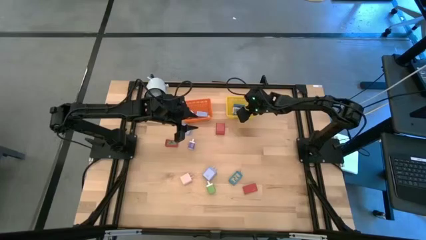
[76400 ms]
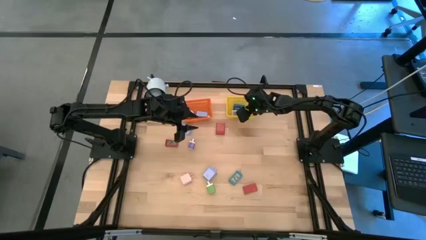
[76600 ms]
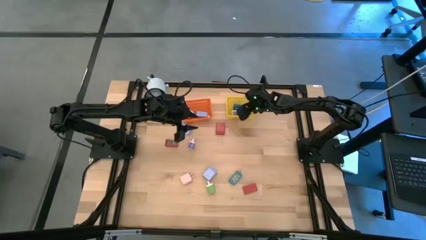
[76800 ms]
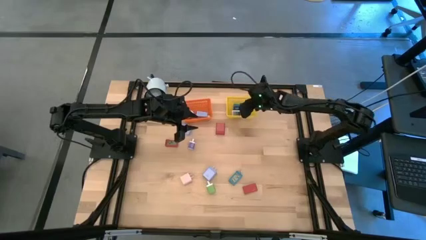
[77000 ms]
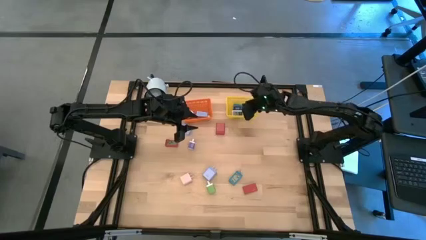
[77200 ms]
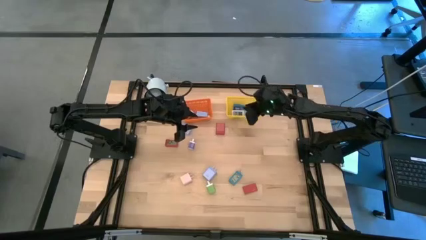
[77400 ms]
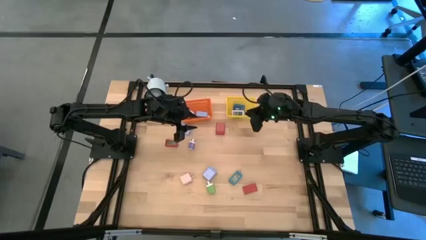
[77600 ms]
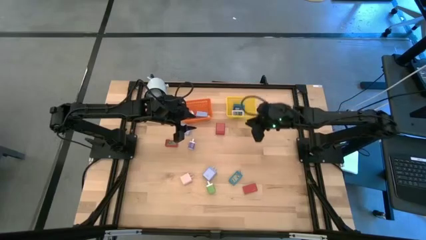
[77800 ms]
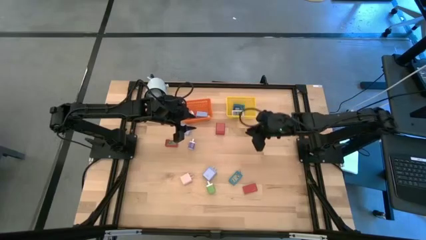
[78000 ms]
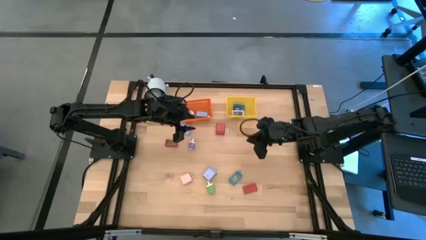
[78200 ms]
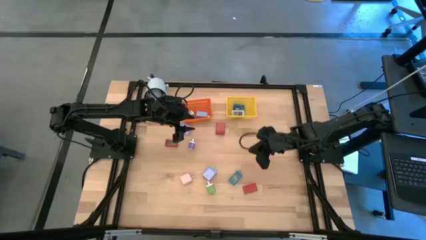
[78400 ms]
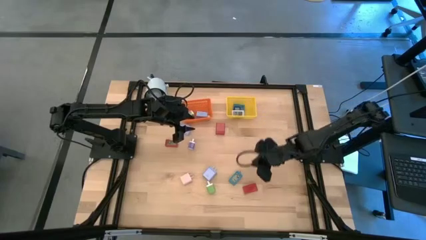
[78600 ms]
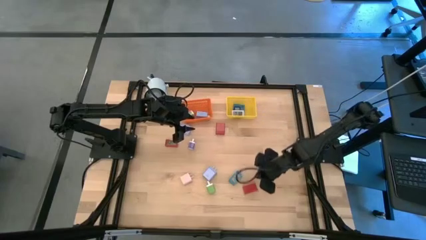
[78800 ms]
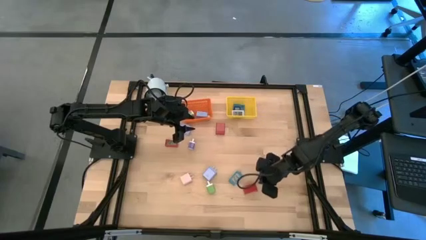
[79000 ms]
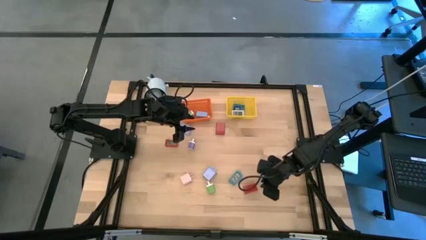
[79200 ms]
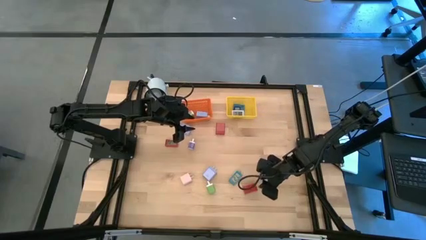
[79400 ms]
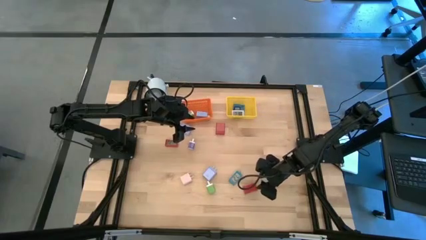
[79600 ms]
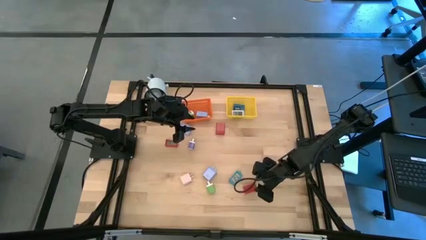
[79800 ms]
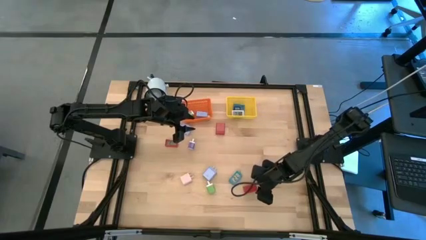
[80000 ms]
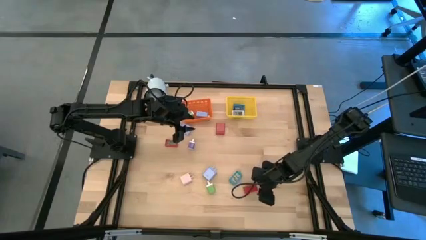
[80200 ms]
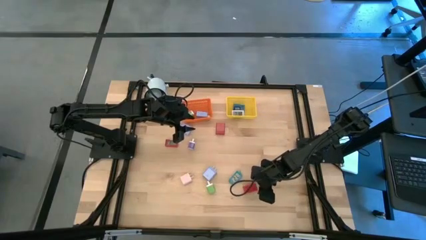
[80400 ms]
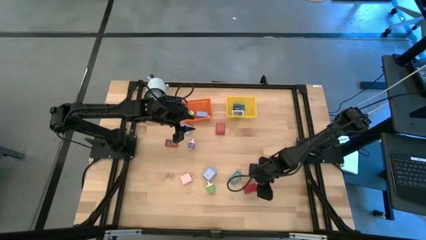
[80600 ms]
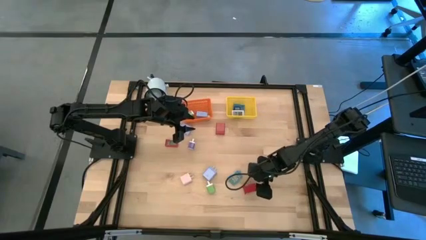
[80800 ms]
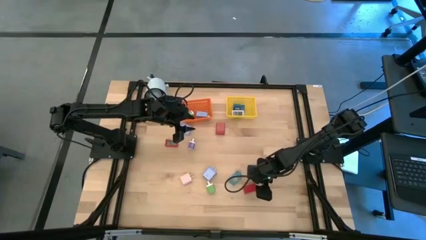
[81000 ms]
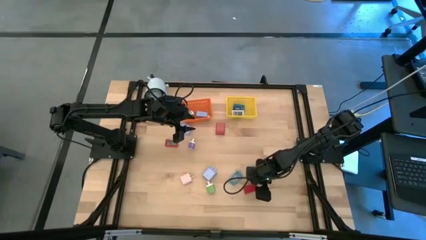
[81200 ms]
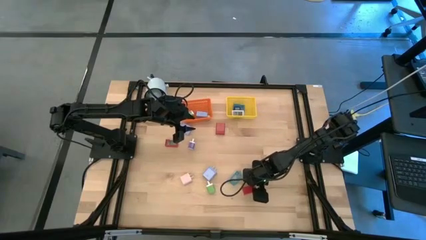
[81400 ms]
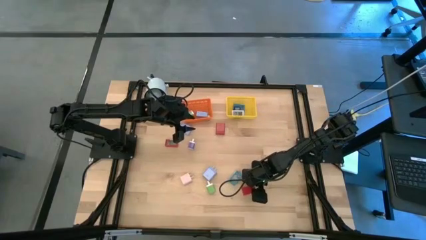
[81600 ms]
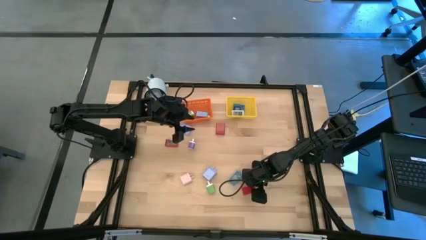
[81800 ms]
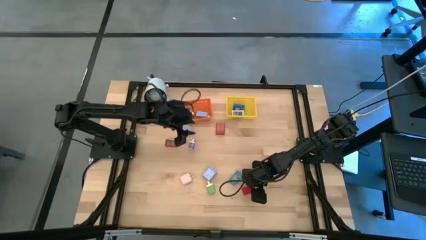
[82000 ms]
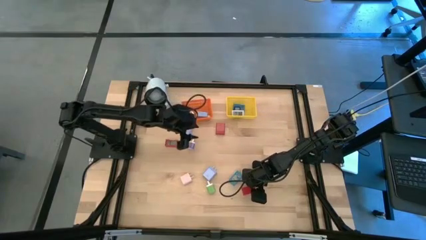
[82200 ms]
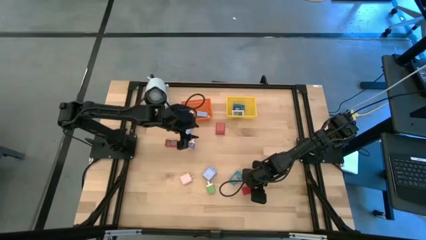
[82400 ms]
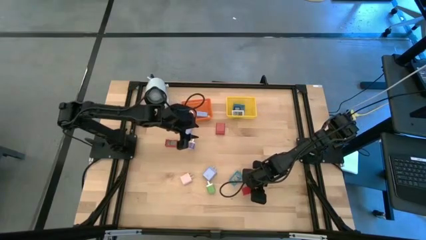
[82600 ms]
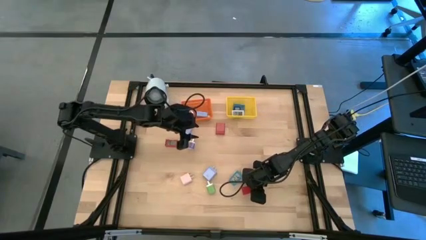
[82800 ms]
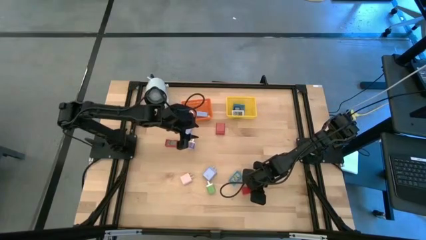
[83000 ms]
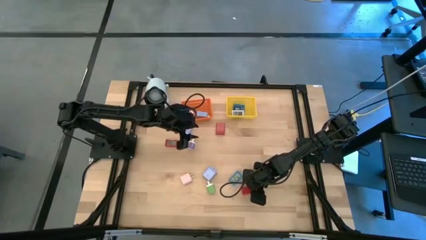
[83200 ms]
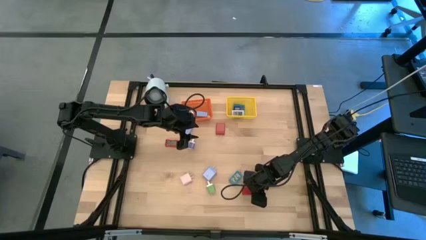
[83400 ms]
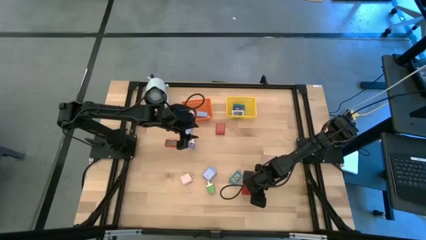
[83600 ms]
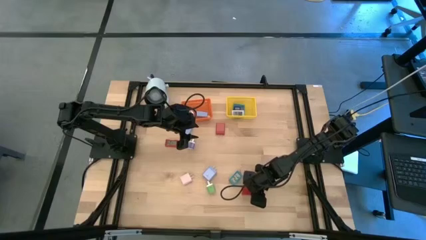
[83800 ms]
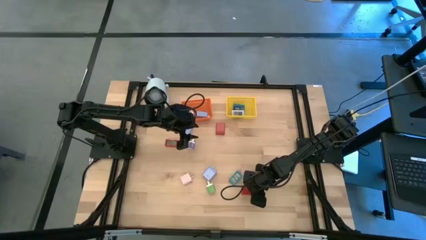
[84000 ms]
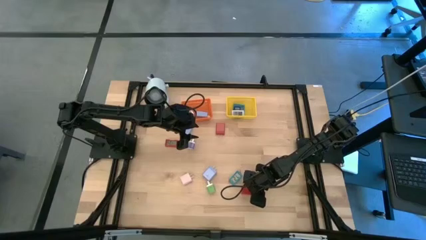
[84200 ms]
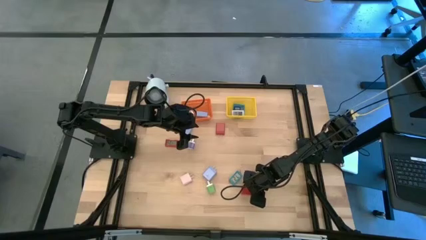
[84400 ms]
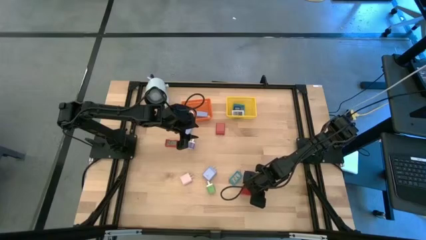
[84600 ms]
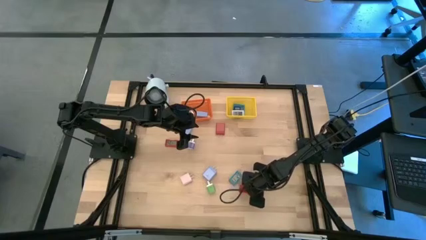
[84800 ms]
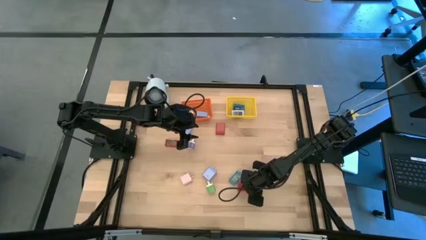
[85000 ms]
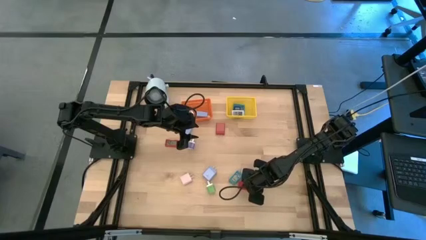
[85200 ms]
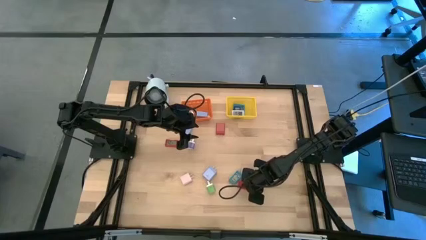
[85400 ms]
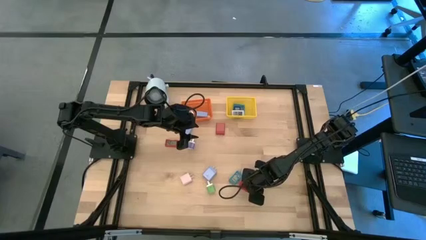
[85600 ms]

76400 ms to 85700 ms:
Task: Pick & Place Office items
Put the bottom red digital clock into the yellow bin

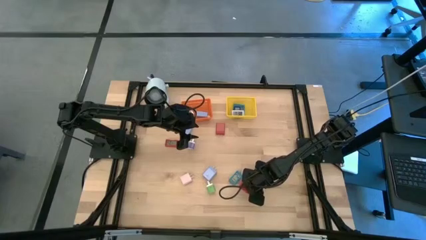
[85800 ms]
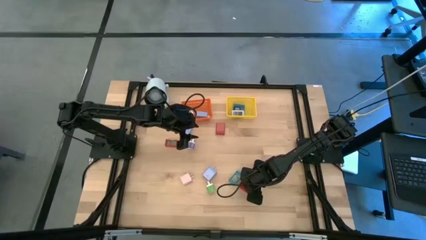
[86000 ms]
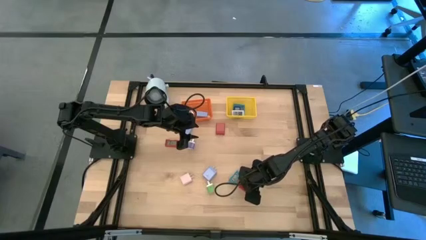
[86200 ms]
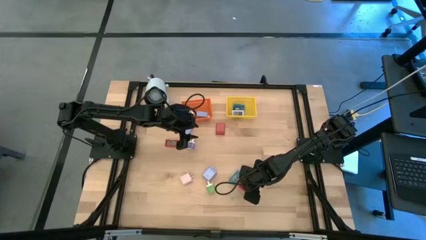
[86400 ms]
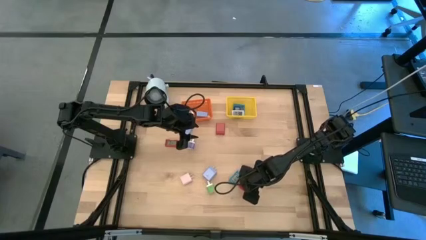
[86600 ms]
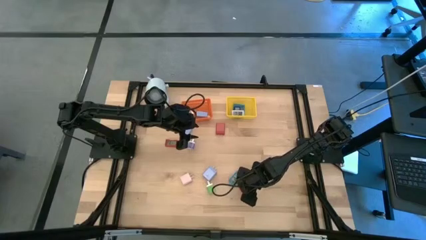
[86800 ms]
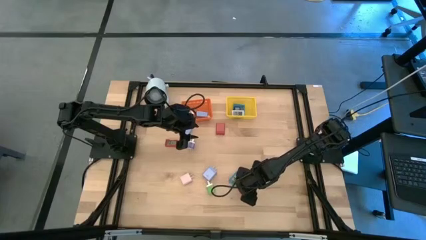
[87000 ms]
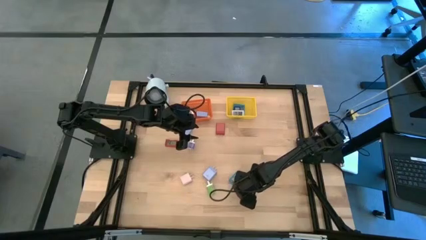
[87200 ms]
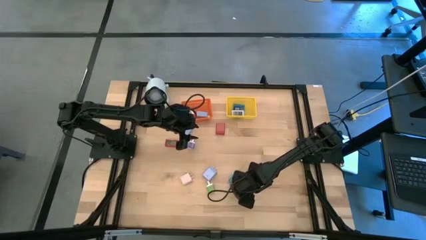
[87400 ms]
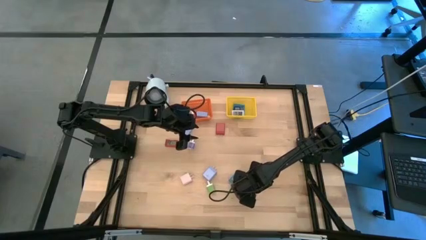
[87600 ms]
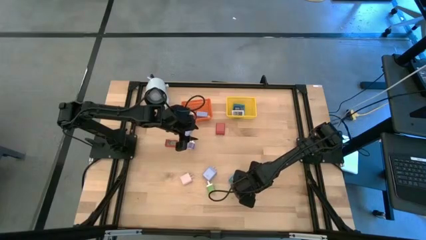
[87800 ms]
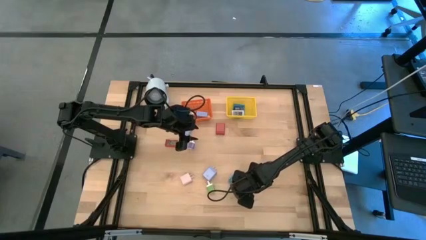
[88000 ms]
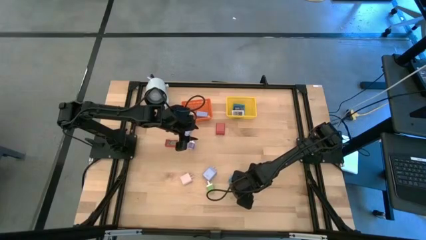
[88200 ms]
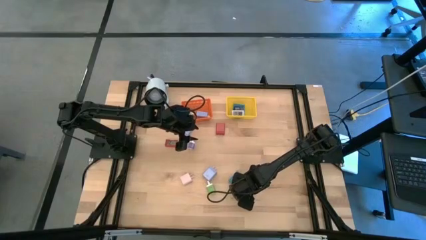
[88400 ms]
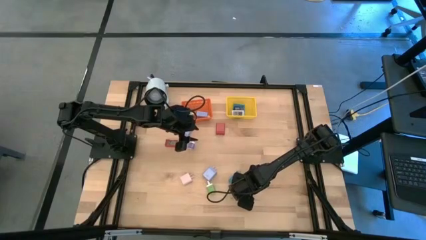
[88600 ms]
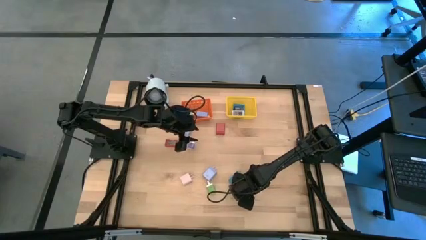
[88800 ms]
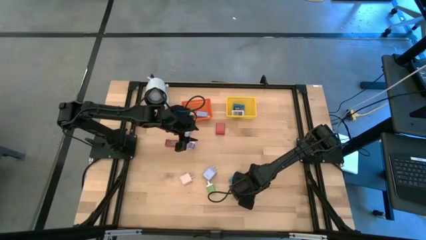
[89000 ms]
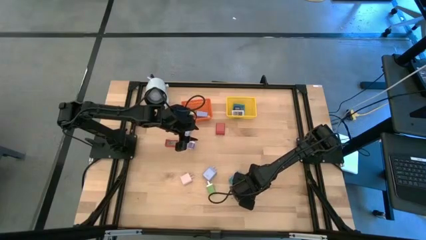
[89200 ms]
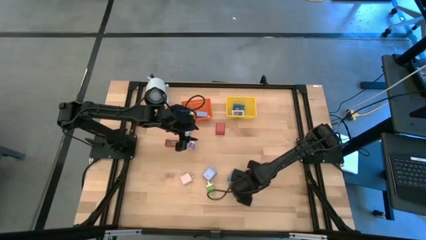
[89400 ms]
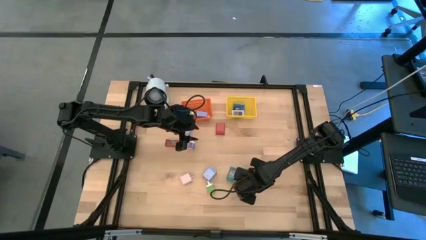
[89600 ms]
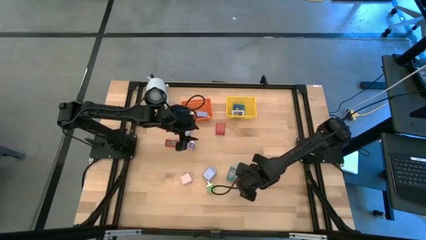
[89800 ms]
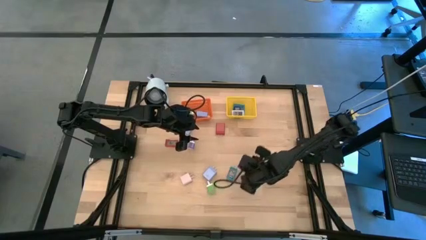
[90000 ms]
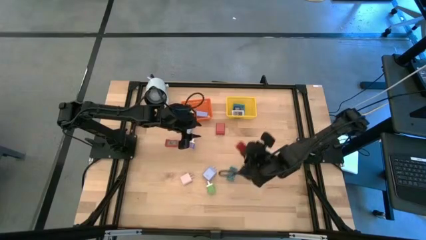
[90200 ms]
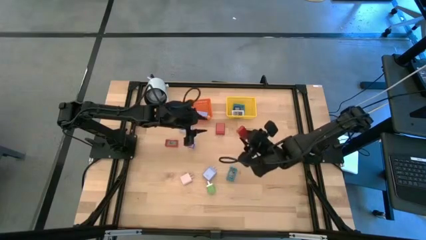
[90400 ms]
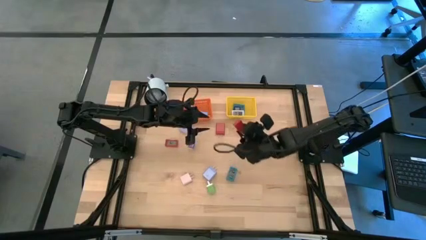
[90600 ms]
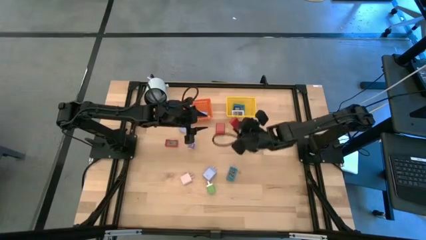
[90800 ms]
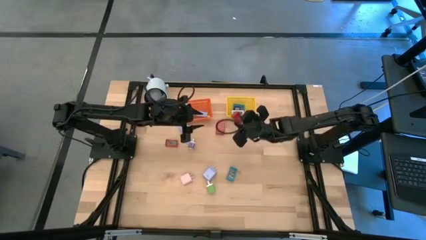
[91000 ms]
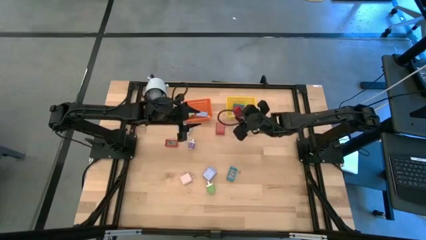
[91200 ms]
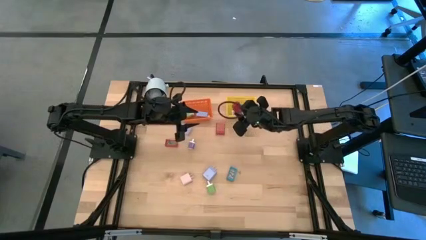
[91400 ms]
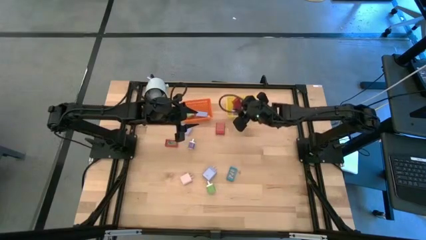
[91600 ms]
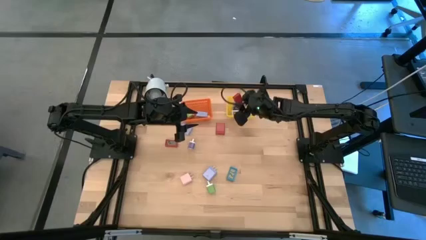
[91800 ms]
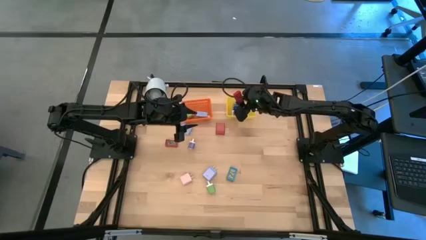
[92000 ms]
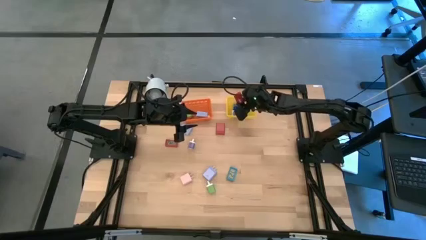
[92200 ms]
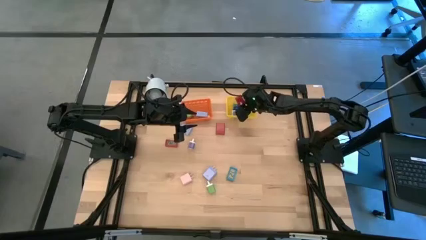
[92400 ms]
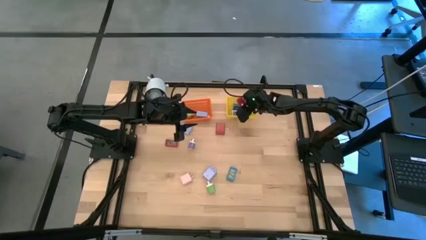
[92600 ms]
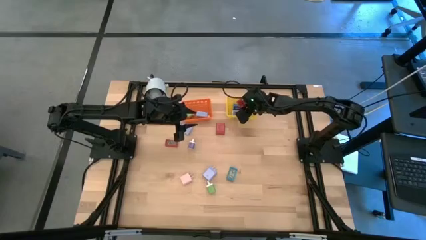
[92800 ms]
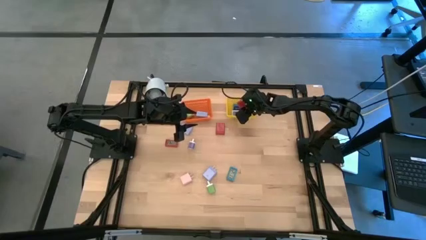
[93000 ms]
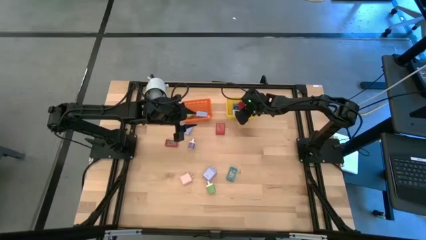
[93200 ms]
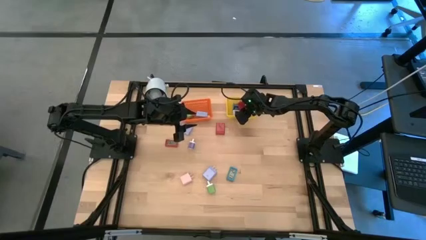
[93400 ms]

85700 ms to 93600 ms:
Put the bottom red digital clock into the yellow bin
